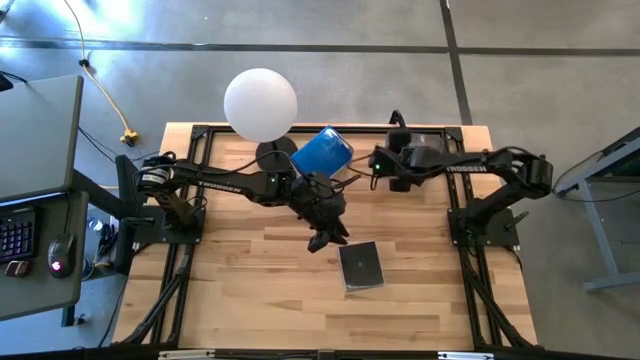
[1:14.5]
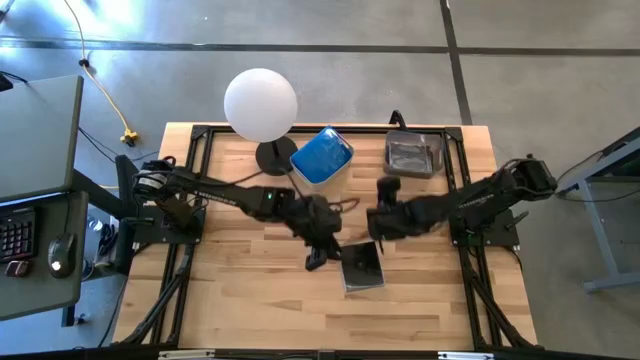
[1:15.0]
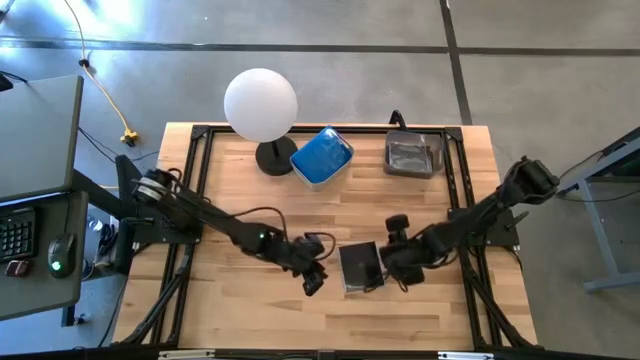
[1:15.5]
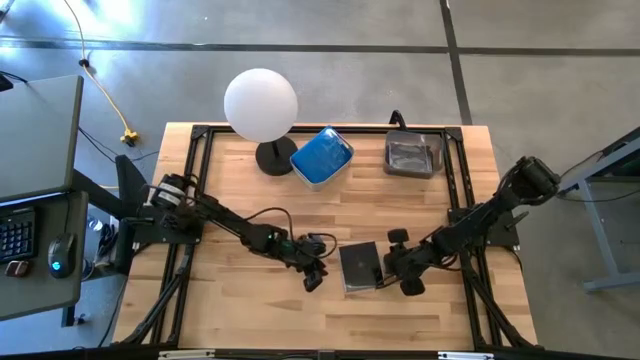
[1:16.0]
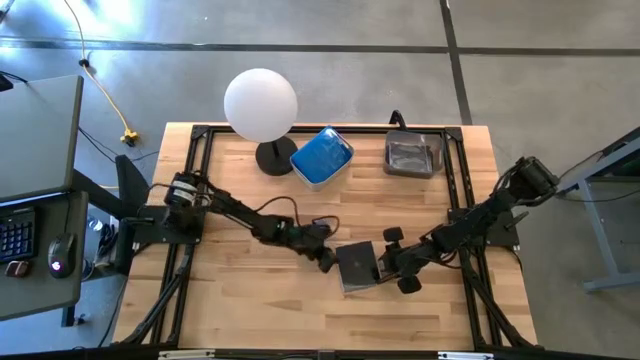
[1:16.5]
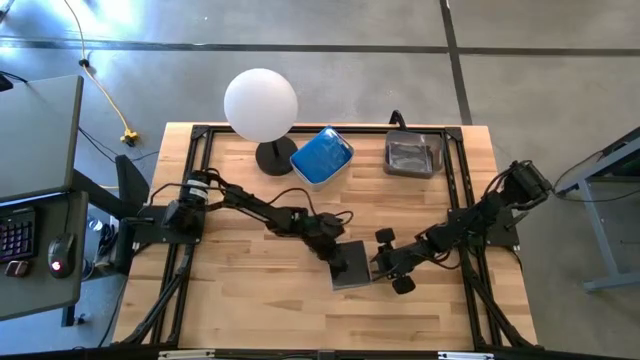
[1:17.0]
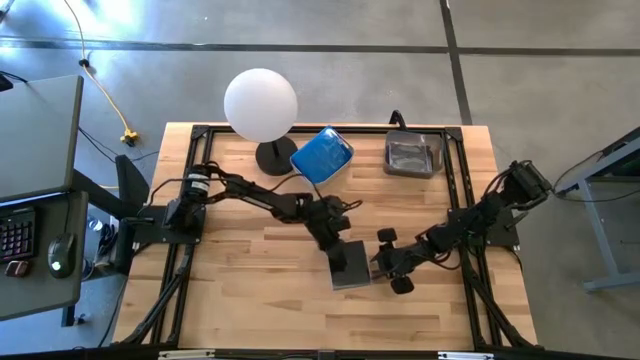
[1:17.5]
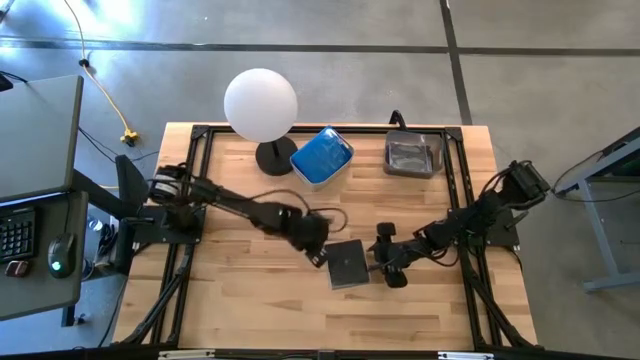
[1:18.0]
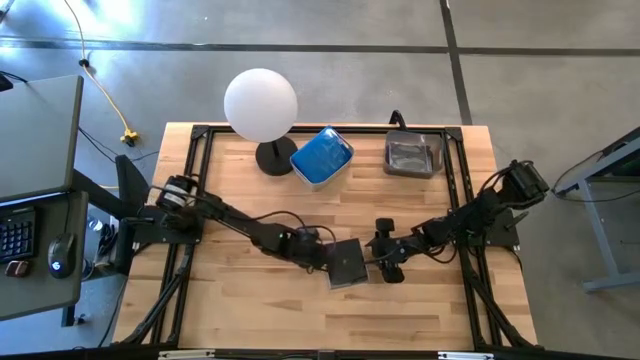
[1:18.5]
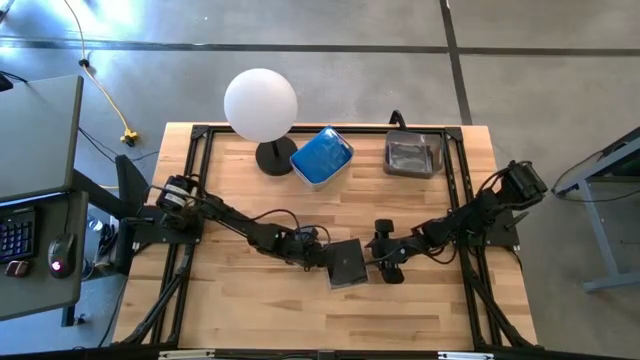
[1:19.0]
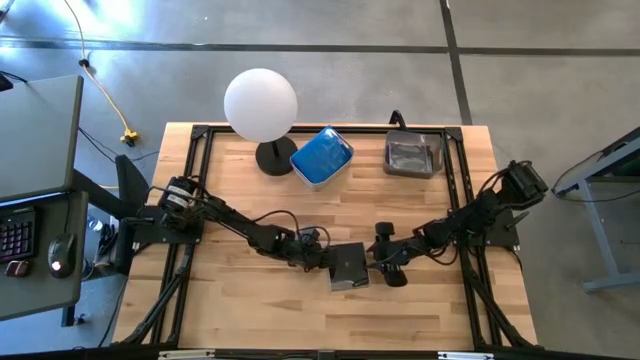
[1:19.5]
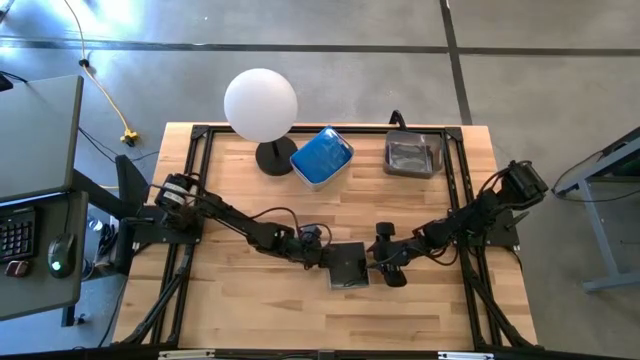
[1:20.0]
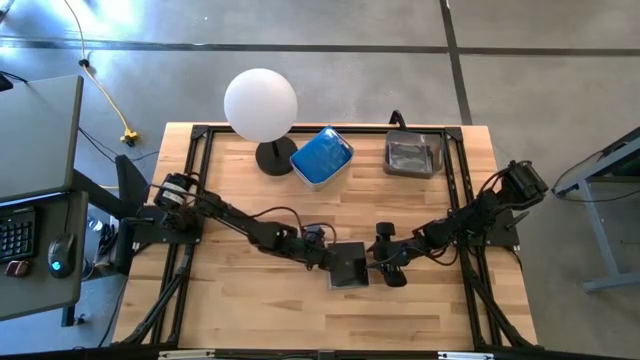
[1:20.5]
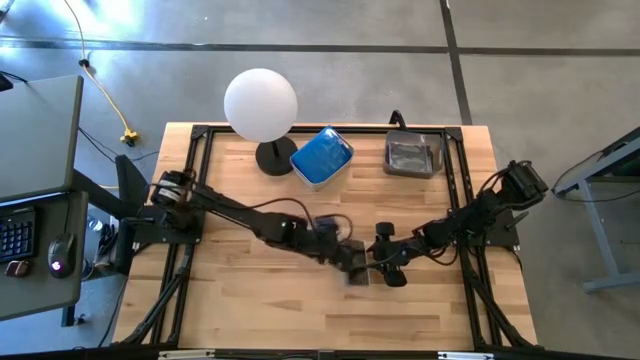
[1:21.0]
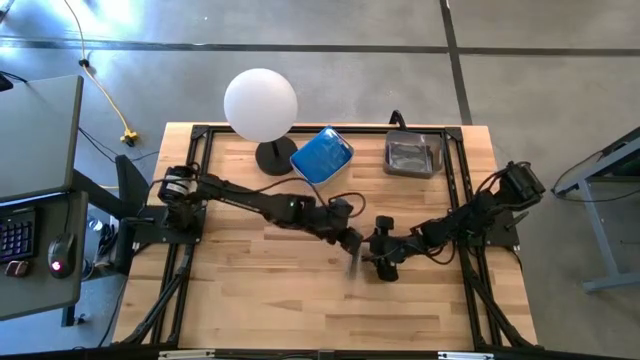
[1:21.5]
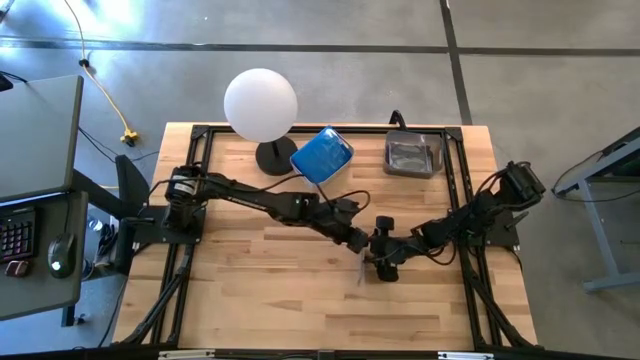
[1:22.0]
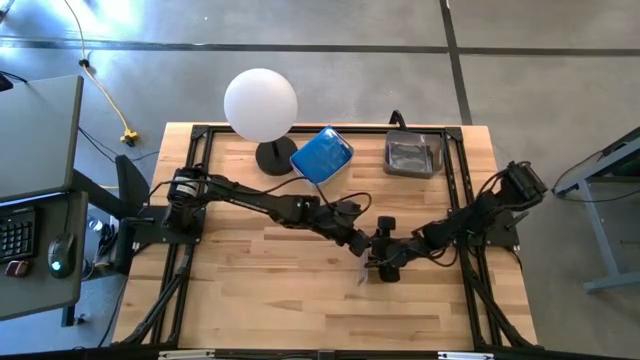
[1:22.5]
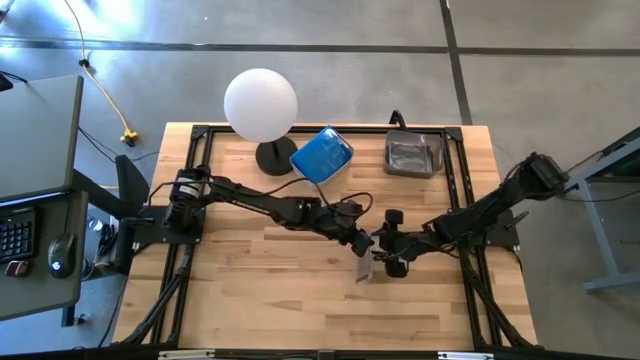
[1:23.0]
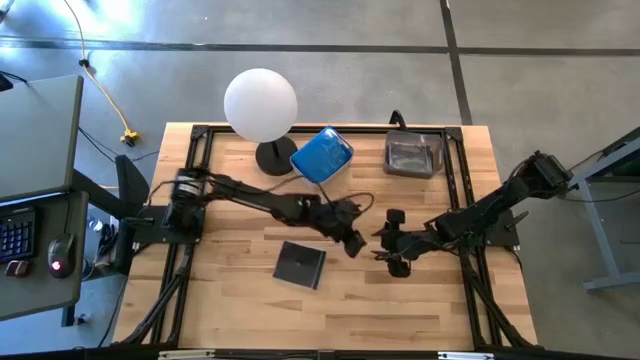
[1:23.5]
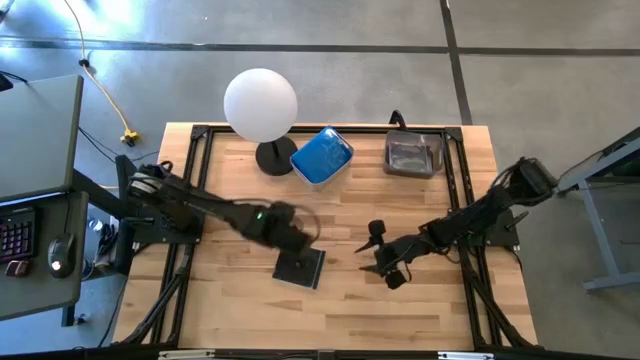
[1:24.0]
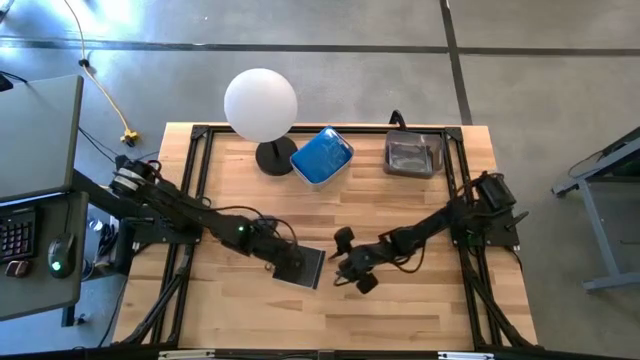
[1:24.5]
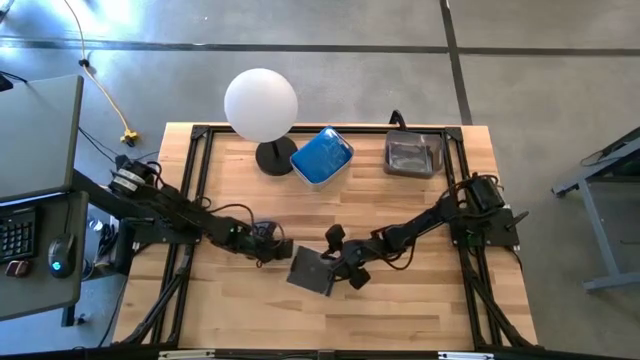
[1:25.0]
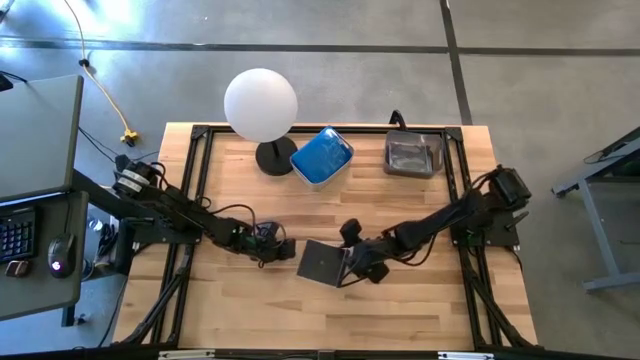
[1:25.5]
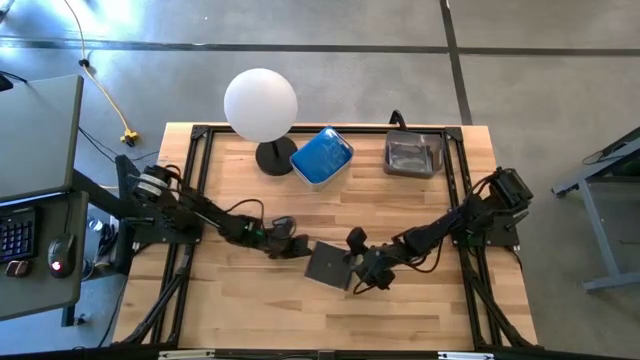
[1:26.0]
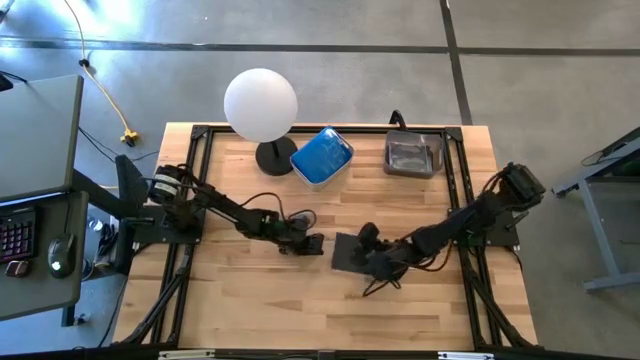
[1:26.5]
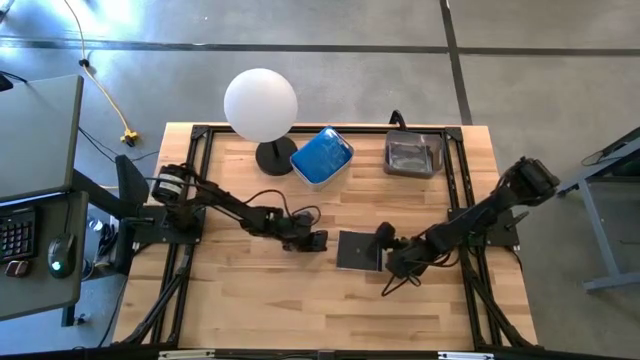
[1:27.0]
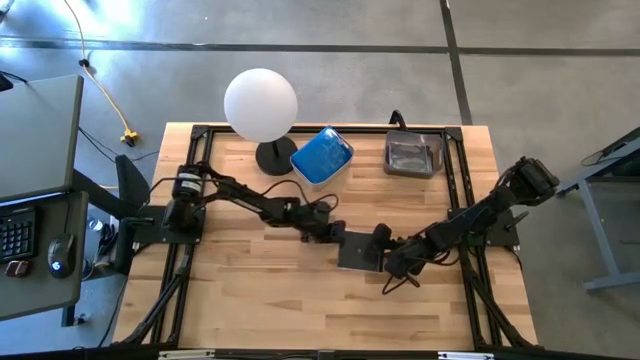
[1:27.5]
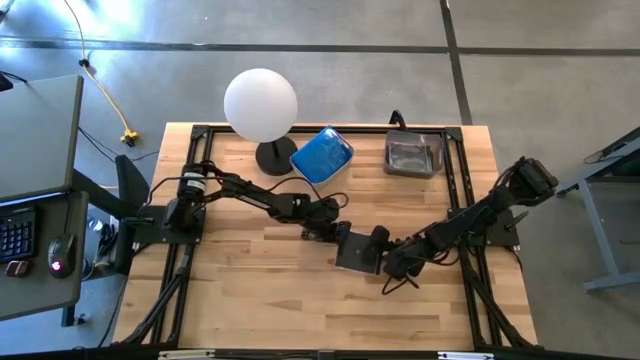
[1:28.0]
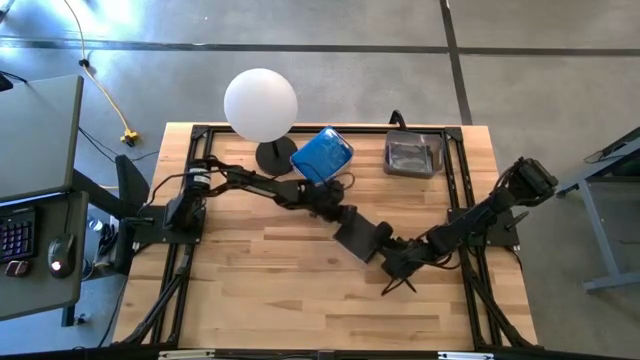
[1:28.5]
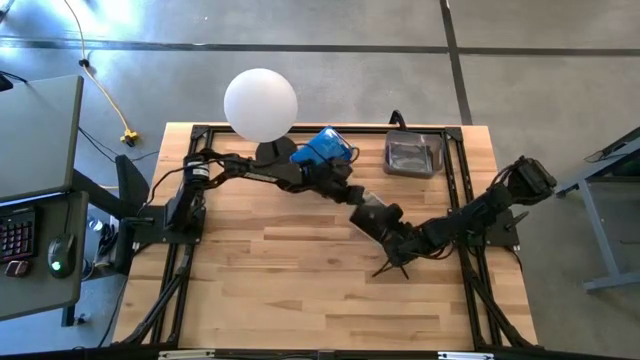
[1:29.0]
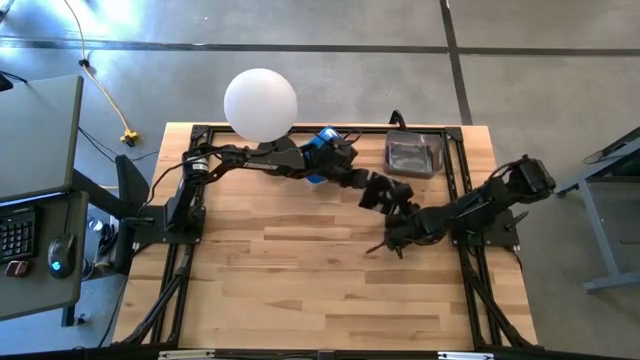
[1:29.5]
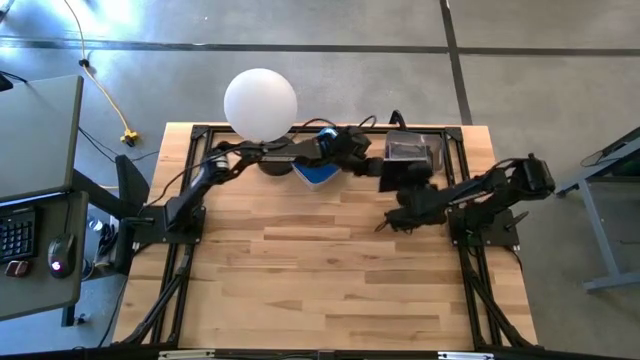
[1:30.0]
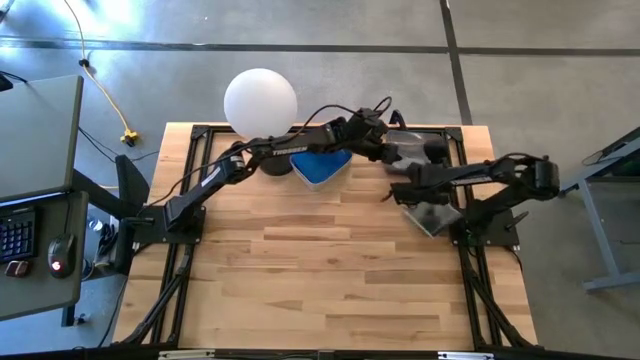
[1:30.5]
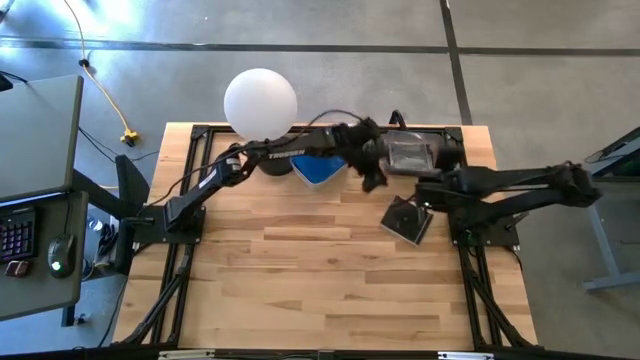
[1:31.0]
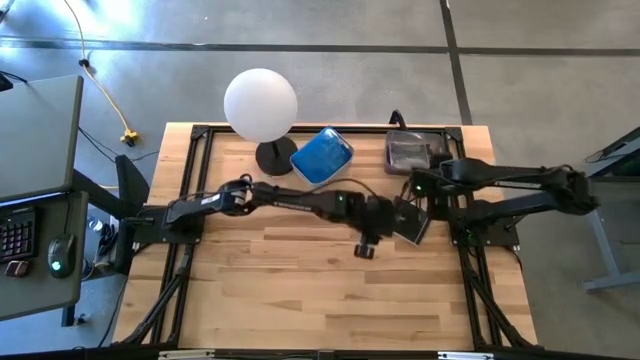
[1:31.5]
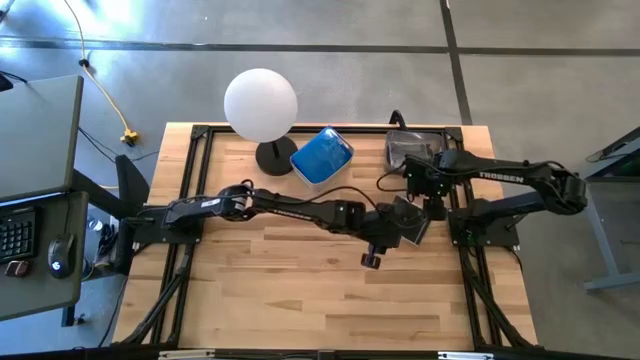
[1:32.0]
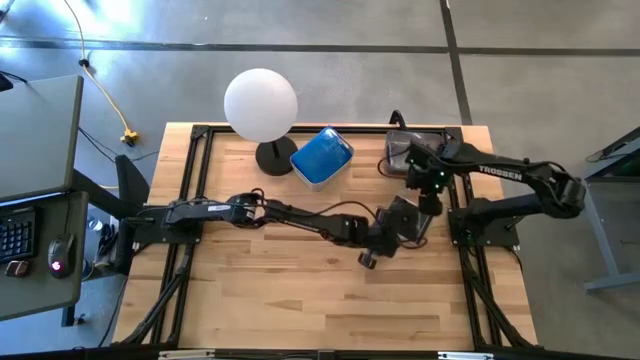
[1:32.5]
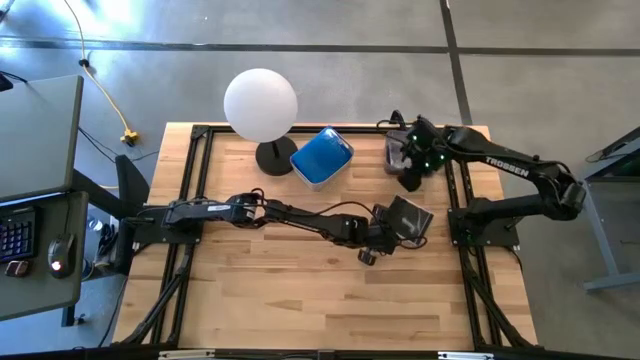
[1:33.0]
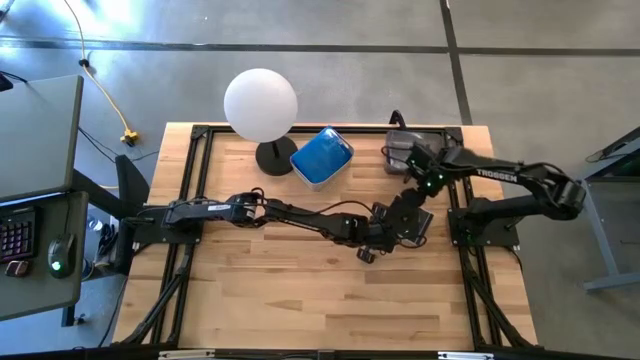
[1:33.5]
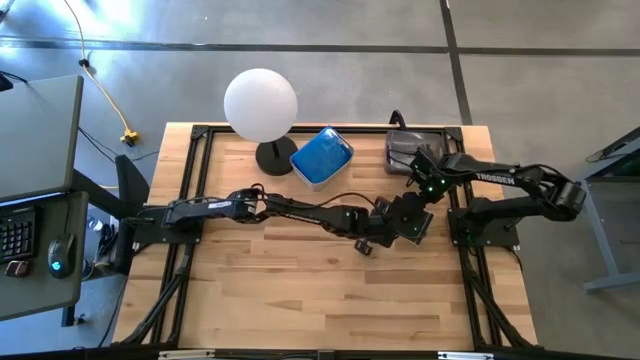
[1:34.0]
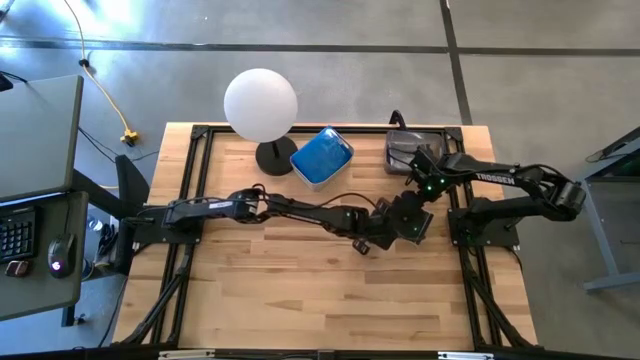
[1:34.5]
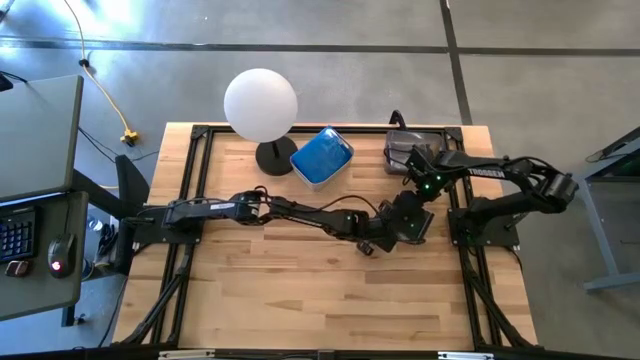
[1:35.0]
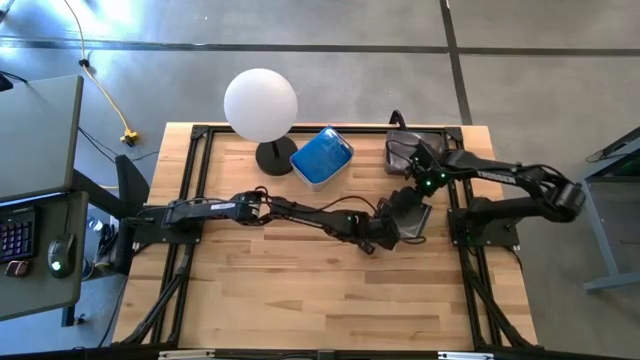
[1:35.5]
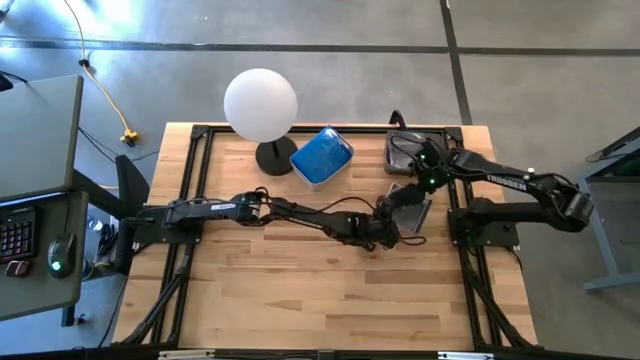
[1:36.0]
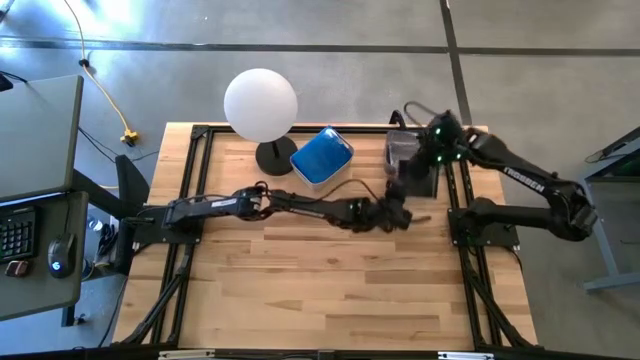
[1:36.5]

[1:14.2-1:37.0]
Task: Pick & place jewel cases by type
Put the black CD case into the black bin
